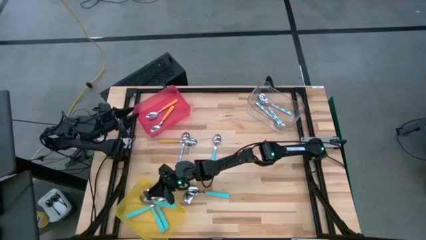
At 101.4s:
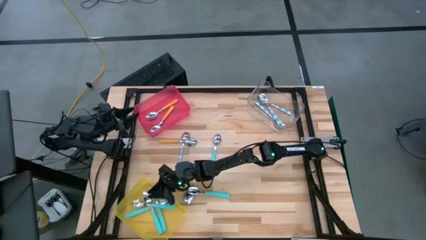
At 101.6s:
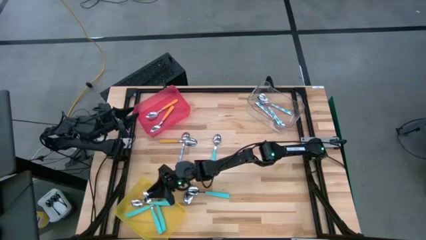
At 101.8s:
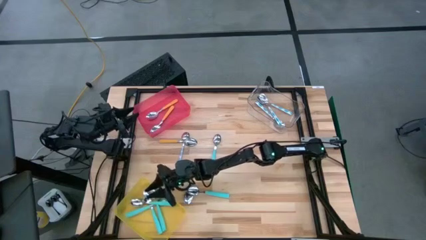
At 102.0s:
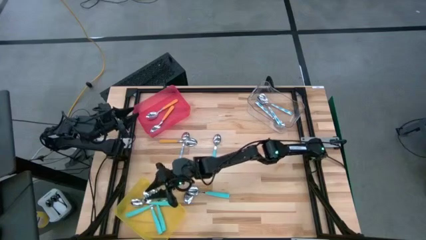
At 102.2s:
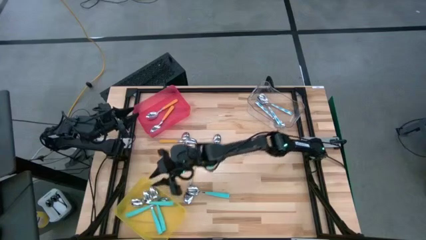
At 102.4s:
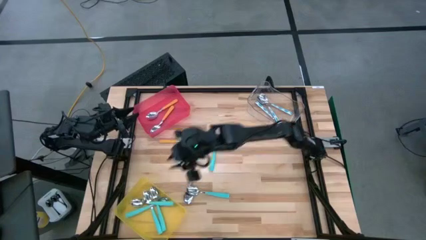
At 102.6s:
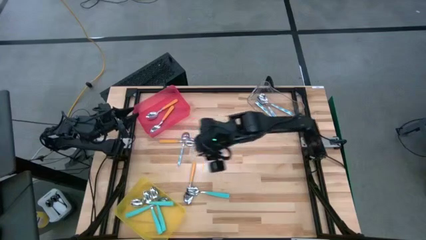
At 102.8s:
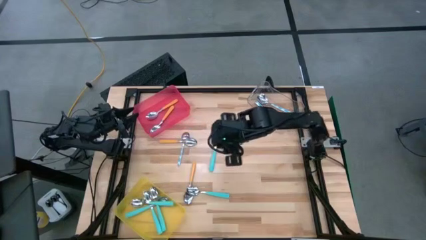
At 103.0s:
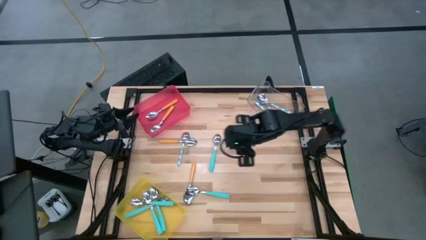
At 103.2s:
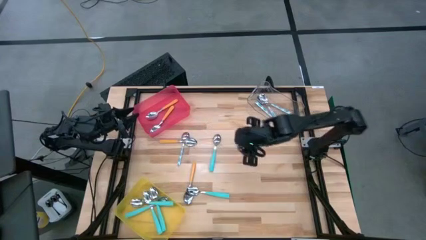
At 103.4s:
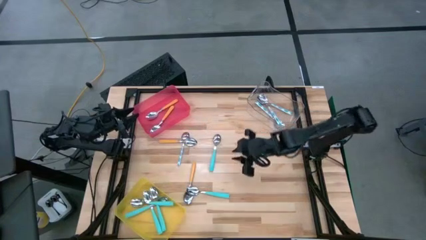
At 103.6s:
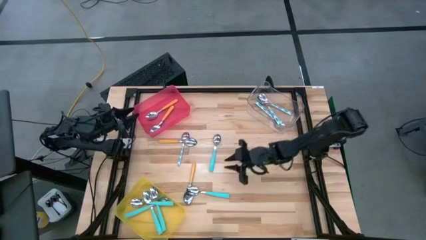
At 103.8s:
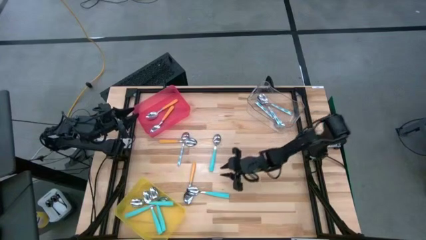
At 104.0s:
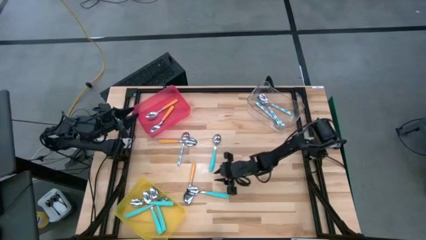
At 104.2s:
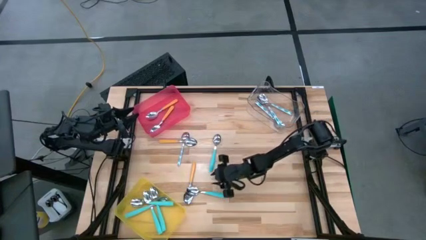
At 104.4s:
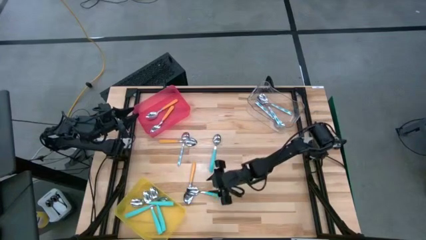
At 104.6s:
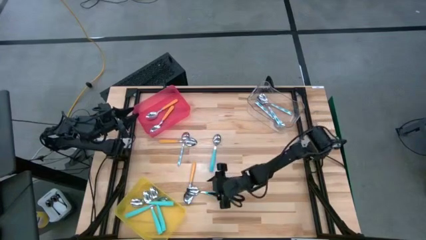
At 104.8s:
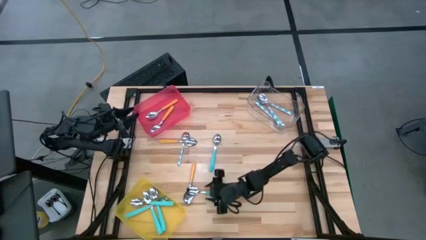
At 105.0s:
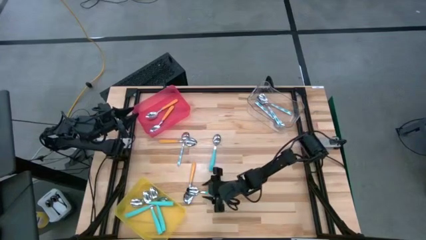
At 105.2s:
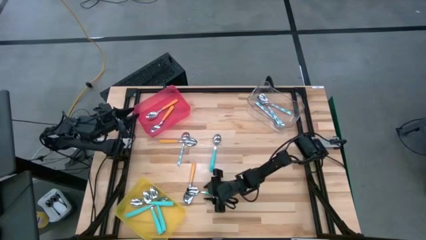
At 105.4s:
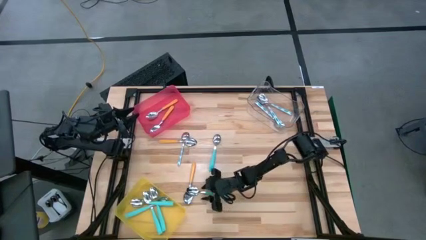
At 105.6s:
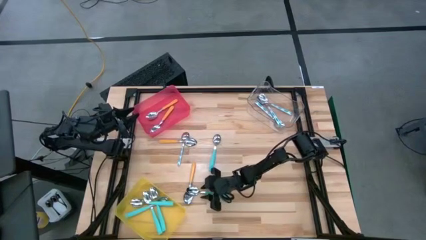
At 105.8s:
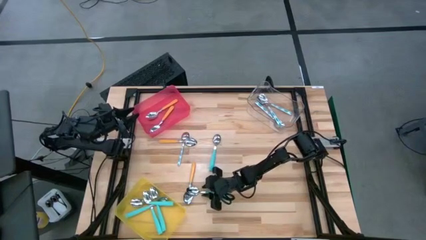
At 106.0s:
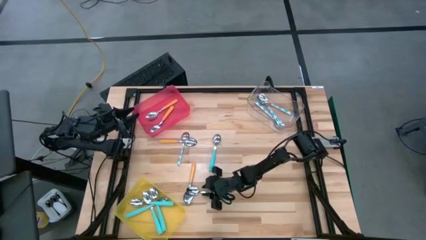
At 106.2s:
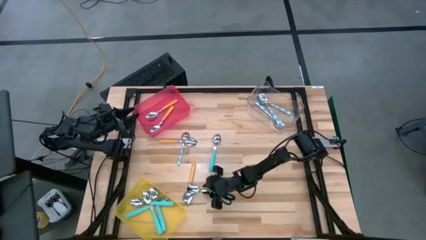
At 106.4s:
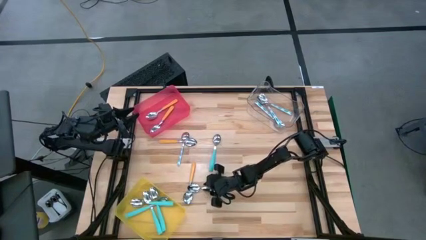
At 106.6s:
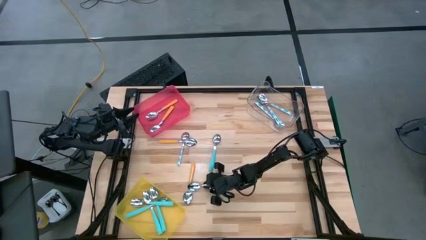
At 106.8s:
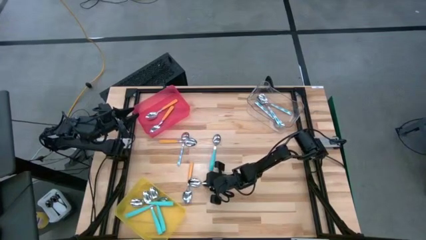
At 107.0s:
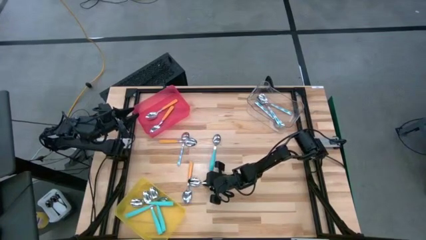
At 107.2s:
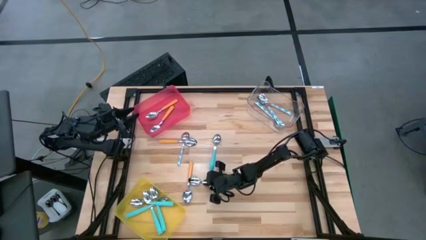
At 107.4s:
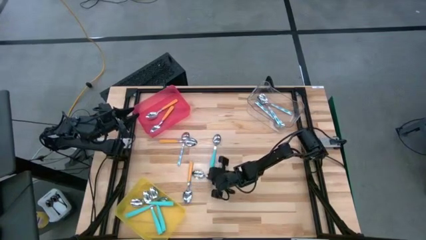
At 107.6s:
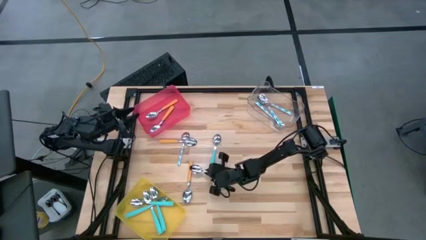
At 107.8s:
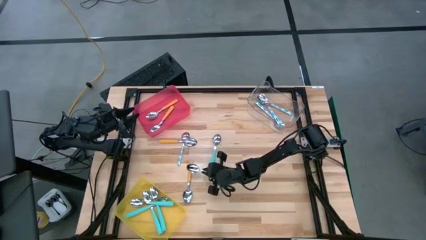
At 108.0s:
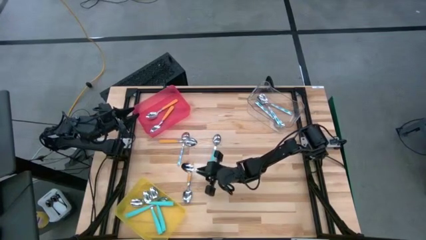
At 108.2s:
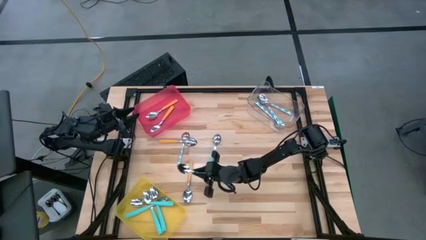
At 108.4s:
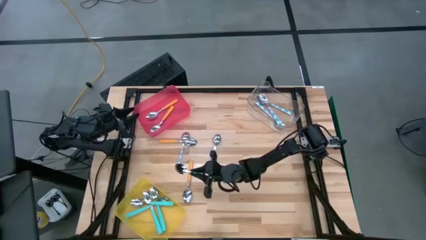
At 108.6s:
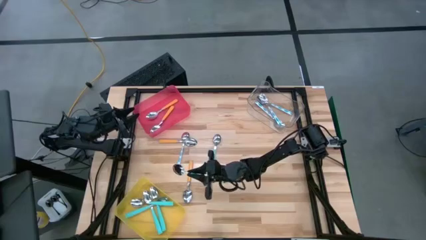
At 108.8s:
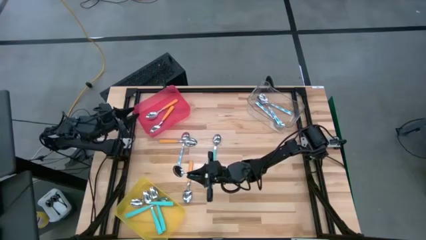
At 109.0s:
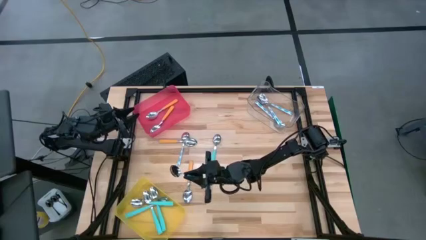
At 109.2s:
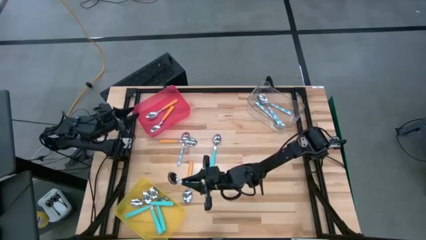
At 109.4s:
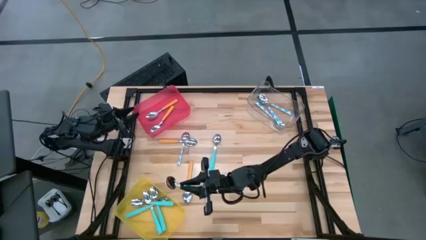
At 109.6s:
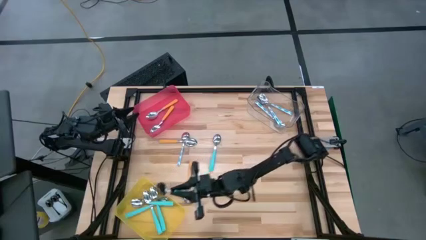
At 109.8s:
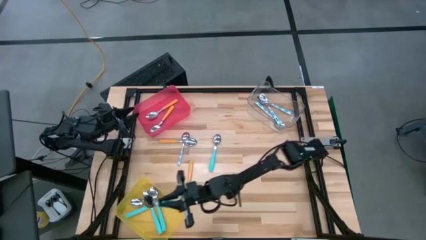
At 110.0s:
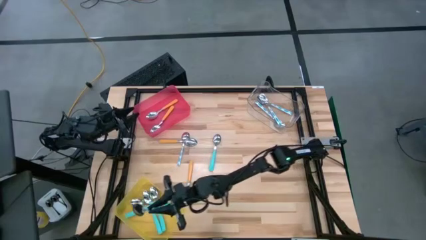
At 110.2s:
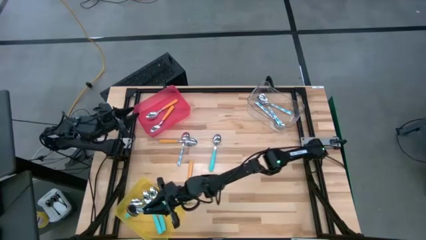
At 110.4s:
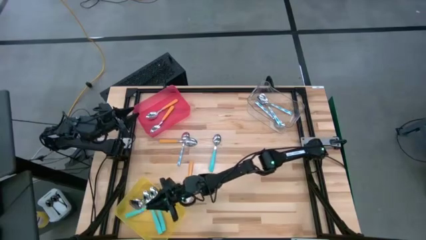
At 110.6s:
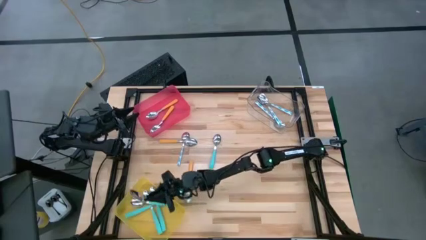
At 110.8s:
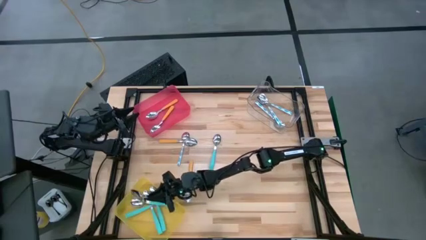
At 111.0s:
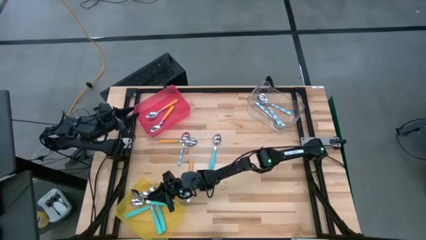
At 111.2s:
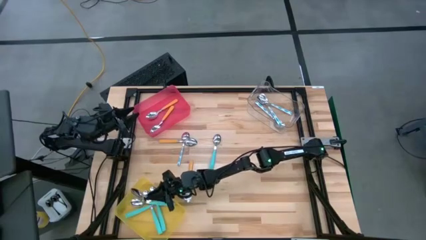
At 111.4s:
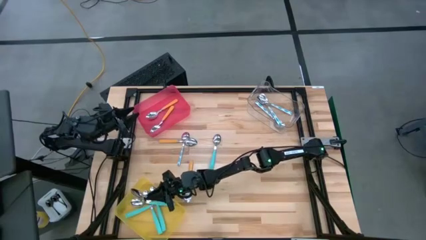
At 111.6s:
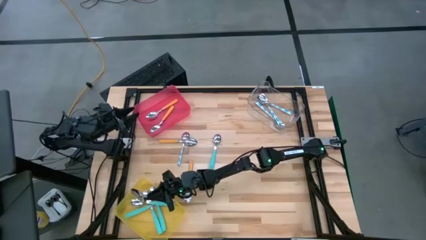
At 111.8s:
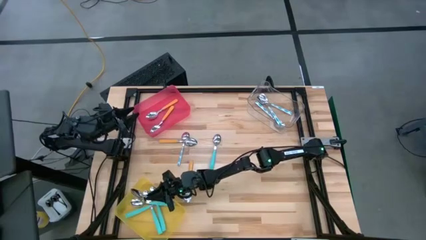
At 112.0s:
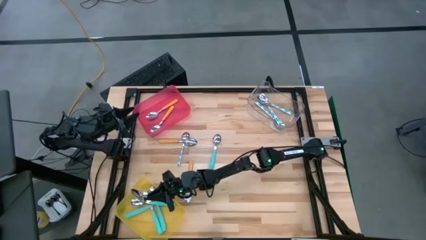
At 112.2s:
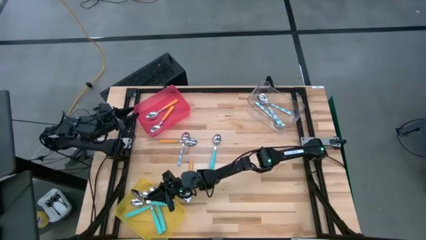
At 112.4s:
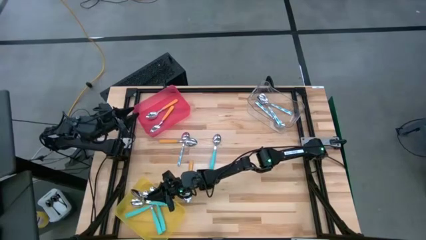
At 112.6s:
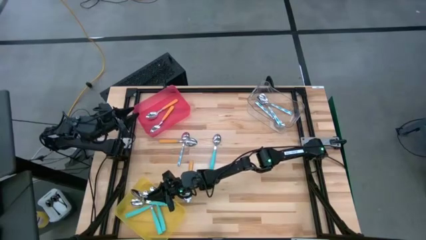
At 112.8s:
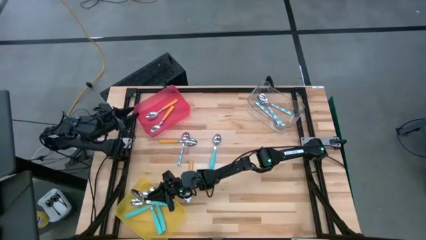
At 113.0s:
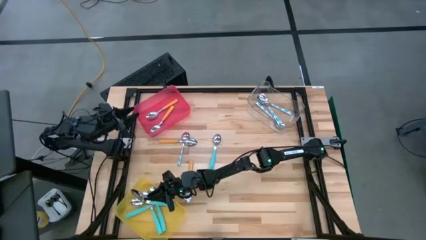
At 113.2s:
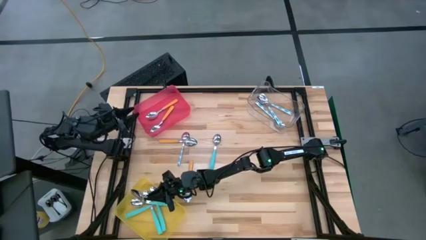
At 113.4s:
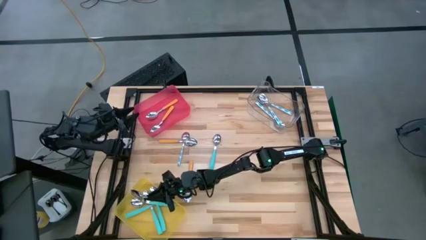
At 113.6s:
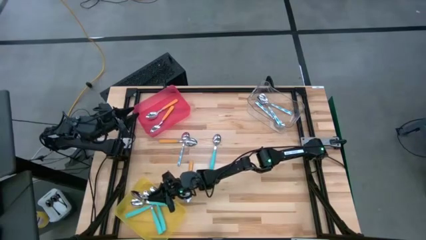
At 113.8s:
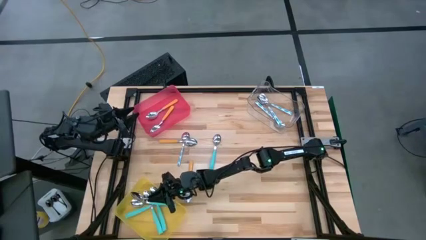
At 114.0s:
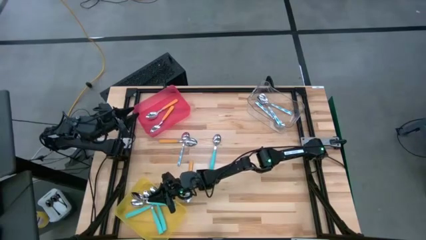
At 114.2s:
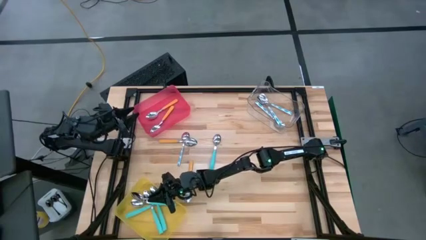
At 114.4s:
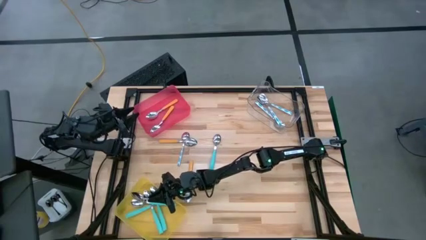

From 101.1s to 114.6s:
Task: Sort silverware by color (type)
Put the light blue spoon into the yellow bin

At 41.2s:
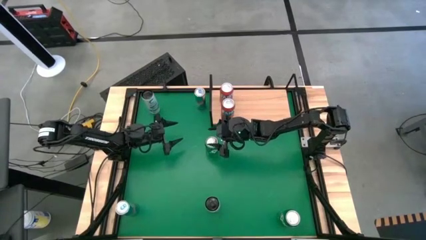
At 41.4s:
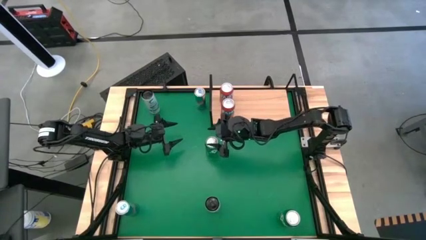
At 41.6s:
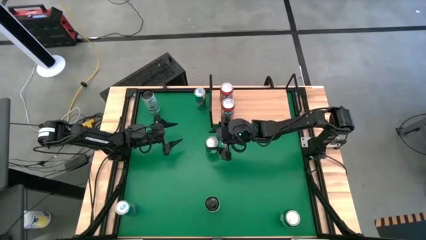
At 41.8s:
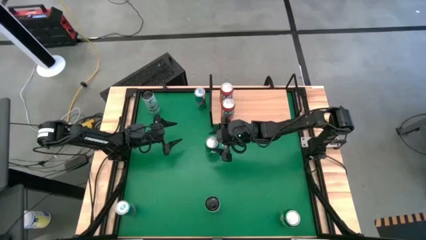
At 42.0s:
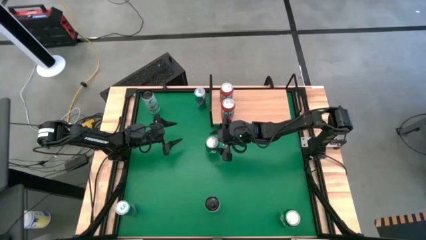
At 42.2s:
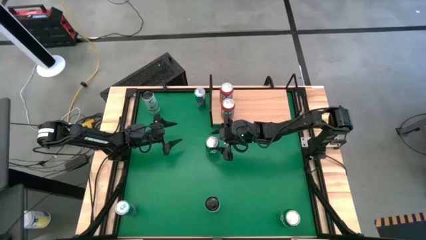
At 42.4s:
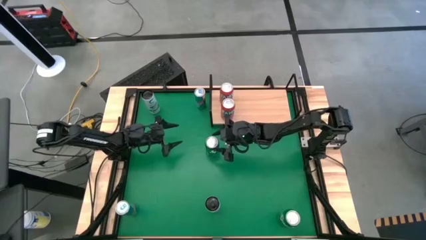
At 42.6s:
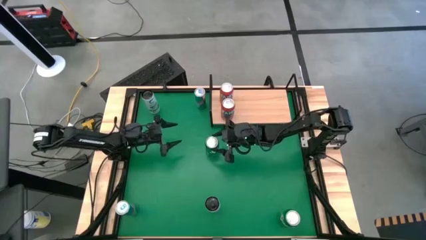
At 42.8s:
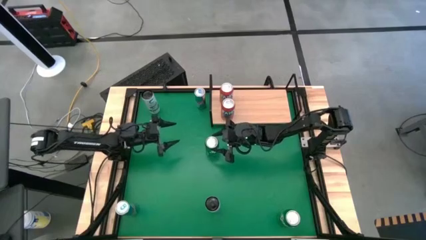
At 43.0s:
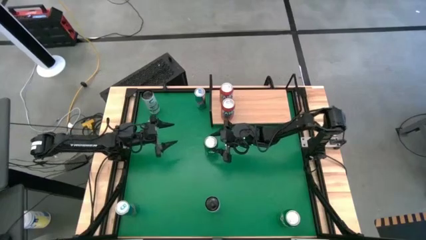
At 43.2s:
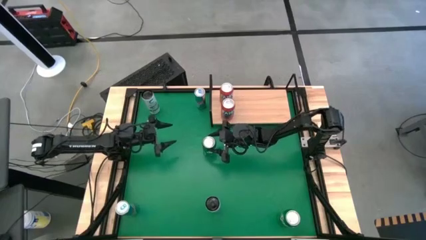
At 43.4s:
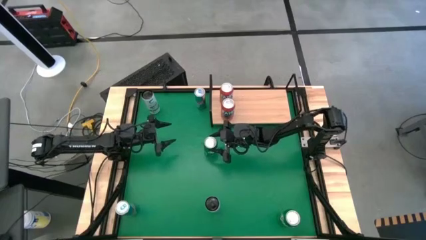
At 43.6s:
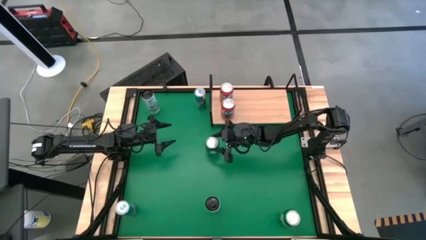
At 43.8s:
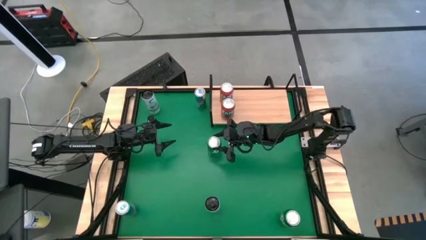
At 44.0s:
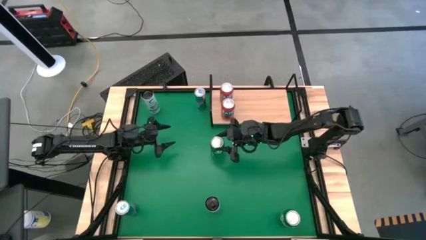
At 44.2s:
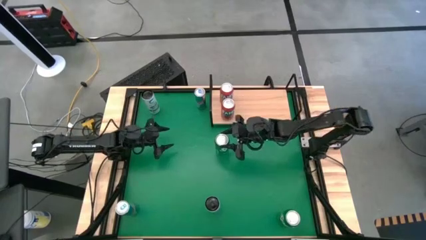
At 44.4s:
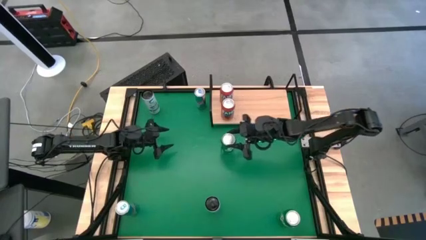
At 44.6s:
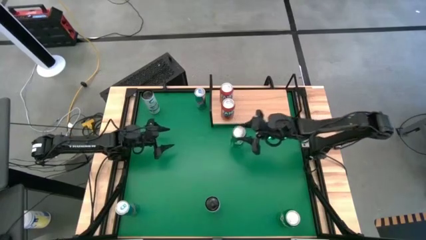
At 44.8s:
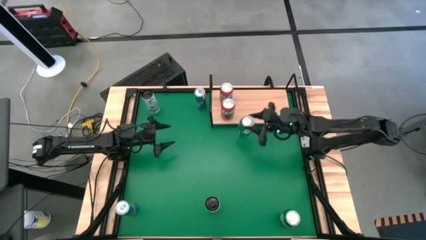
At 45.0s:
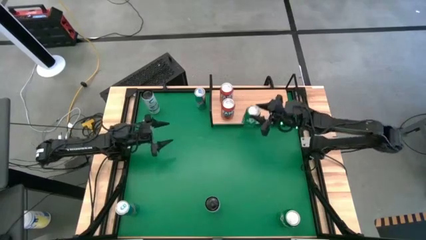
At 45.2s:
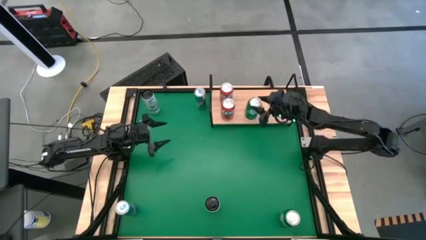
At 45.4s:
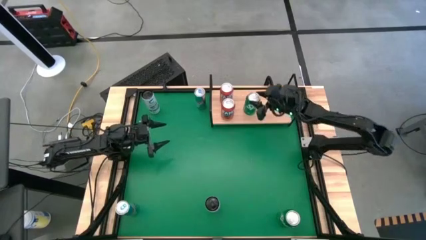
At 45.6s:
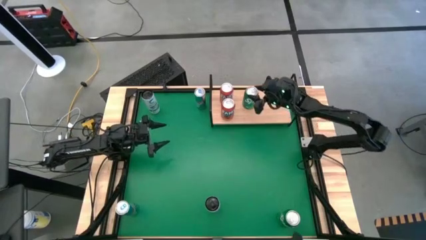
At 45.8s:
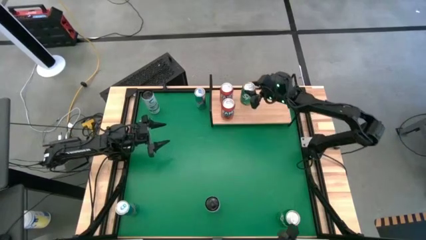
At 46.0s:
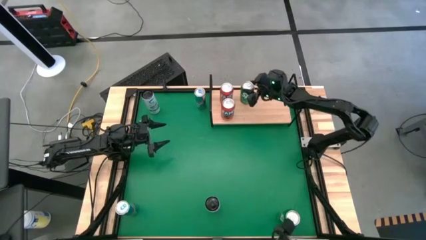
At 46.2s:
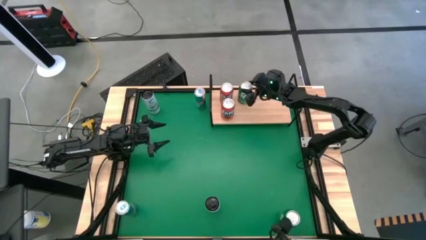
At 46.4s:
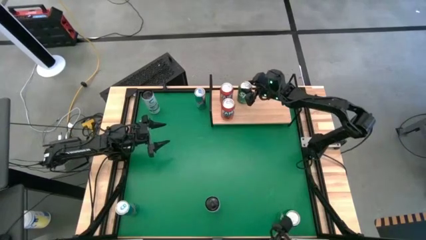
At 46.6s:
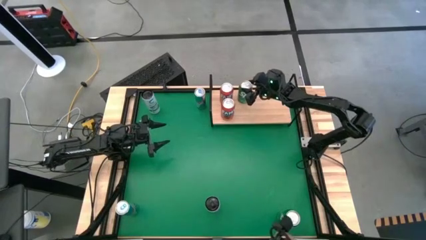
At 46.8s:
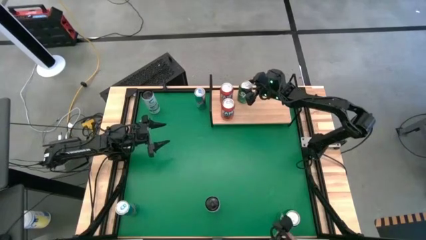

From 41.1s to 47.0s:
Task: Place canned beverage on shelf
Put the top green soda can on the shelf
